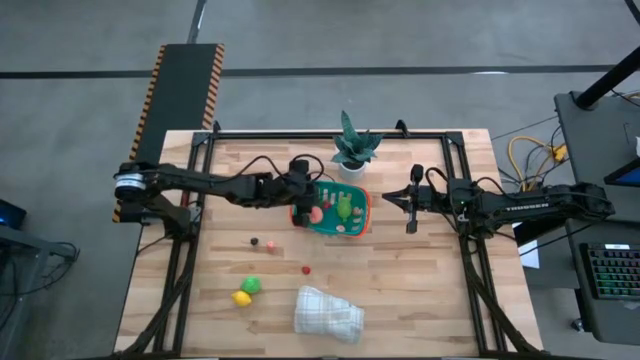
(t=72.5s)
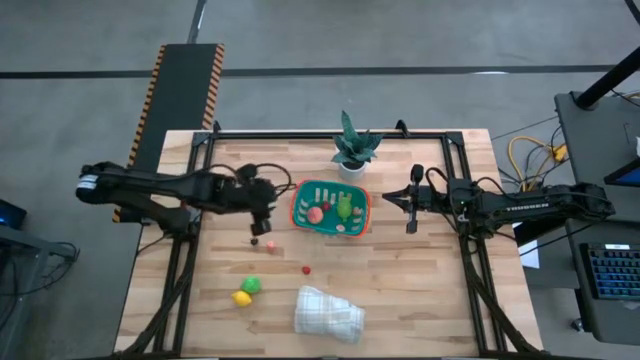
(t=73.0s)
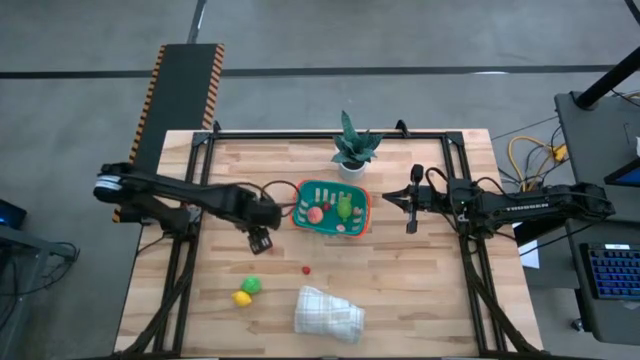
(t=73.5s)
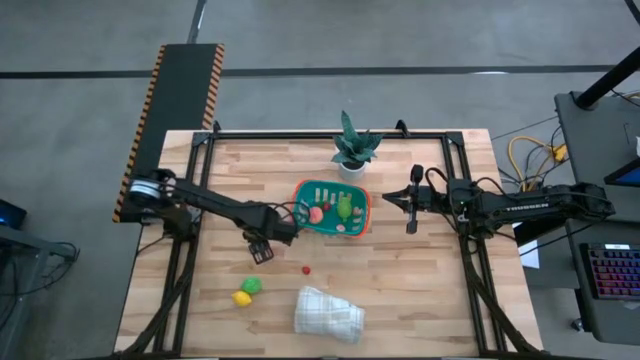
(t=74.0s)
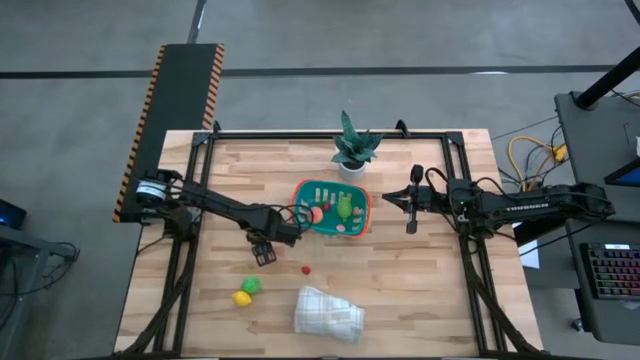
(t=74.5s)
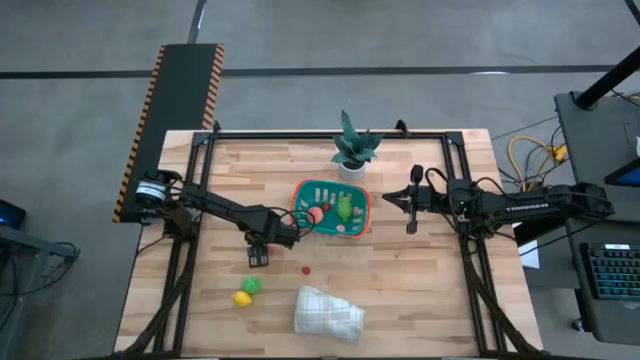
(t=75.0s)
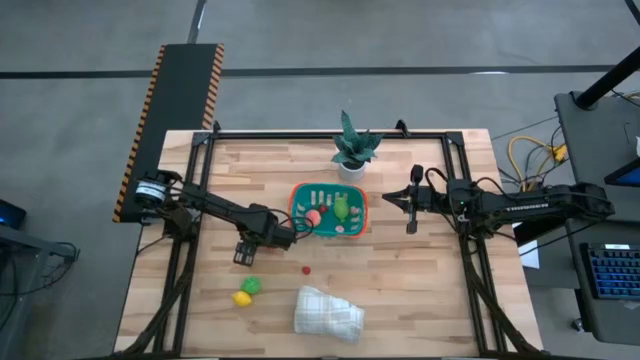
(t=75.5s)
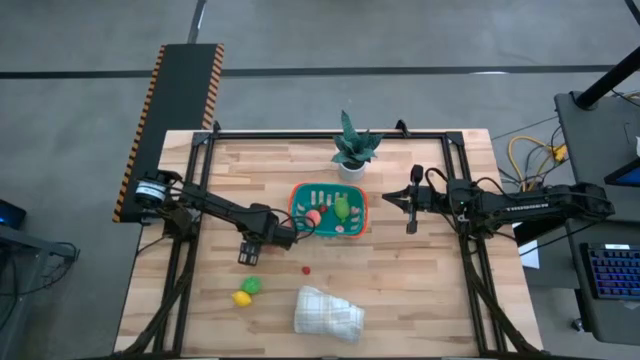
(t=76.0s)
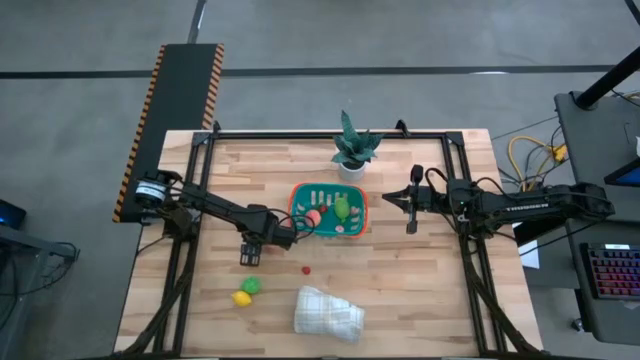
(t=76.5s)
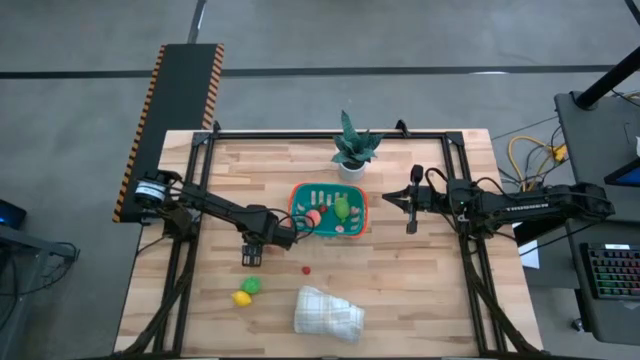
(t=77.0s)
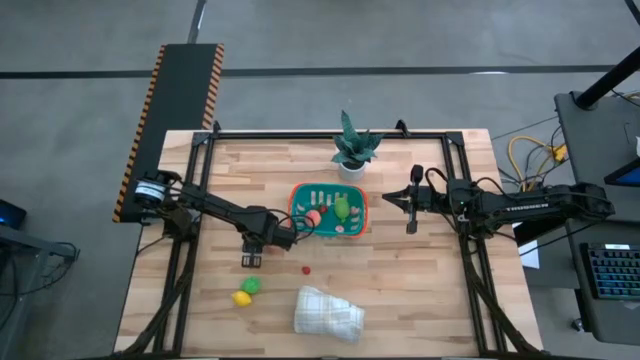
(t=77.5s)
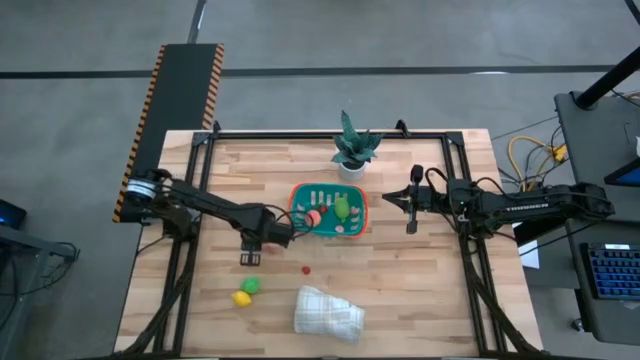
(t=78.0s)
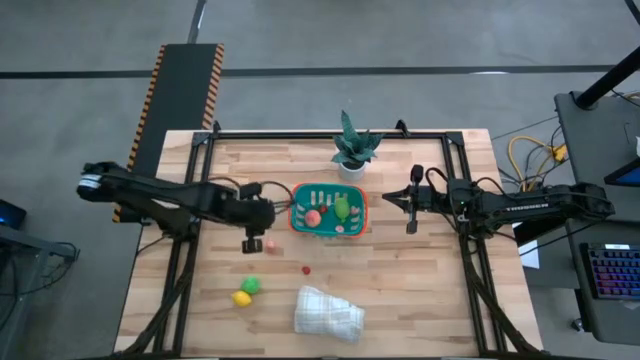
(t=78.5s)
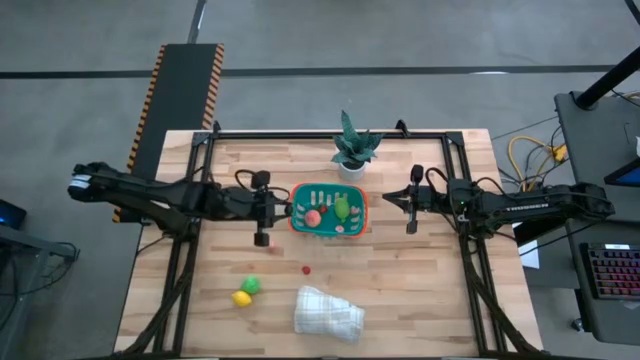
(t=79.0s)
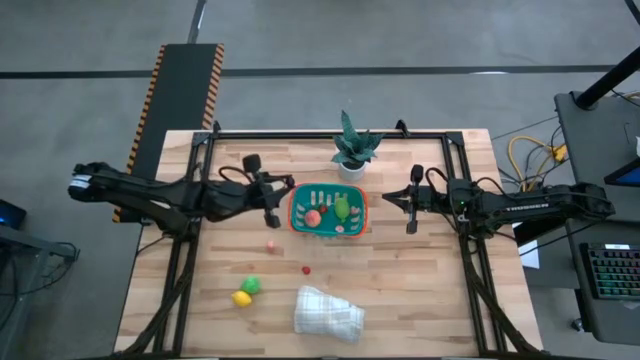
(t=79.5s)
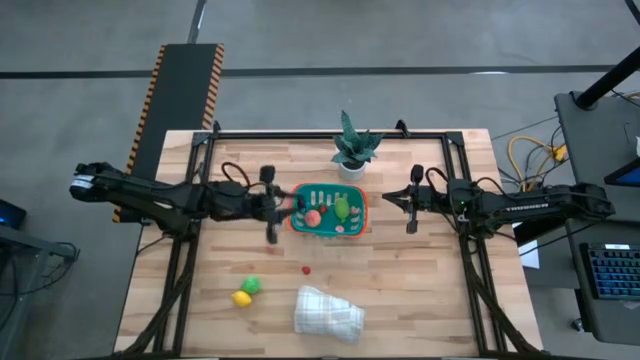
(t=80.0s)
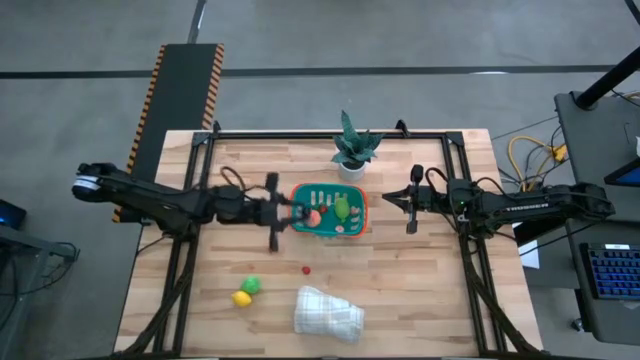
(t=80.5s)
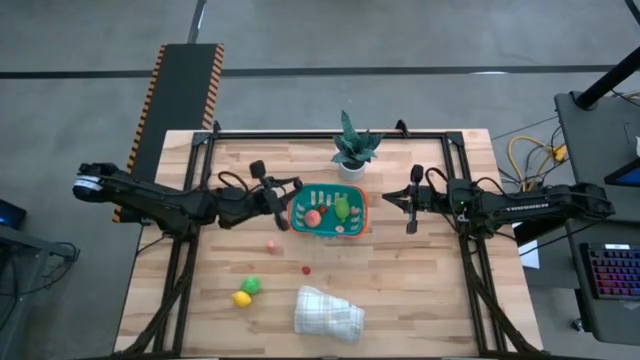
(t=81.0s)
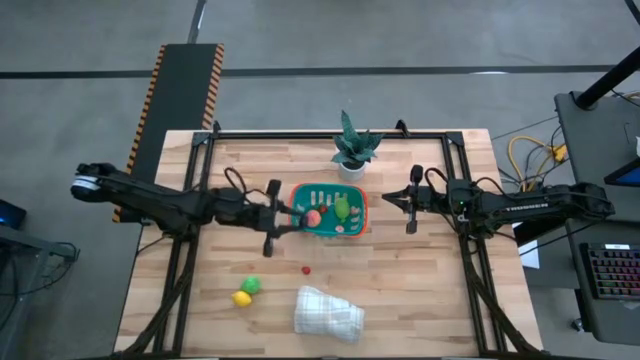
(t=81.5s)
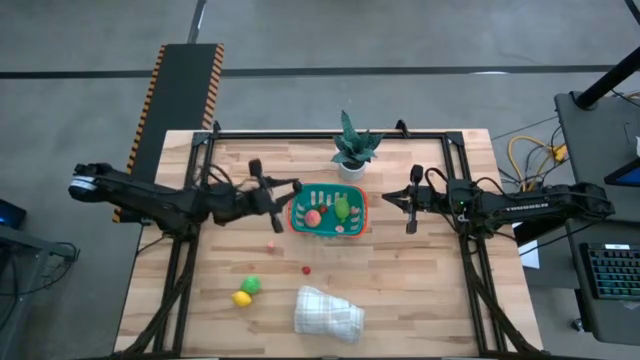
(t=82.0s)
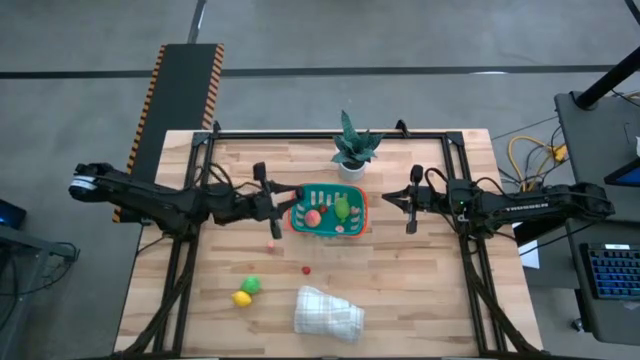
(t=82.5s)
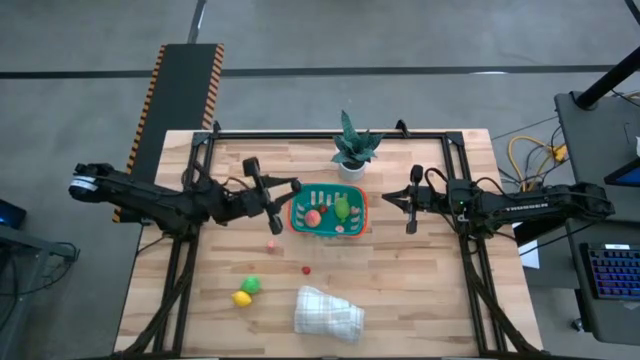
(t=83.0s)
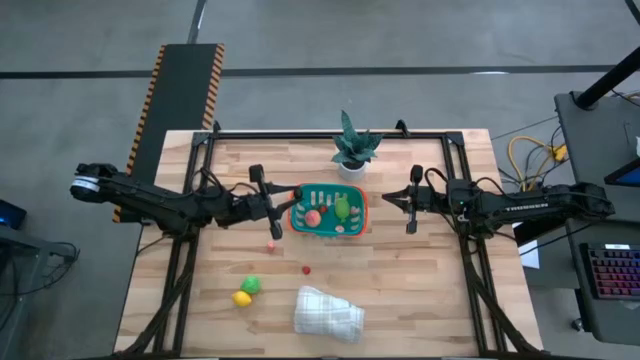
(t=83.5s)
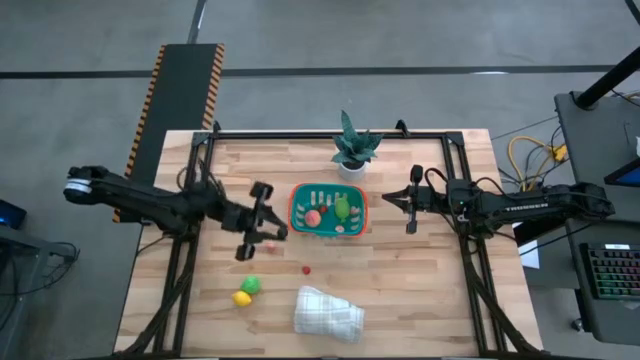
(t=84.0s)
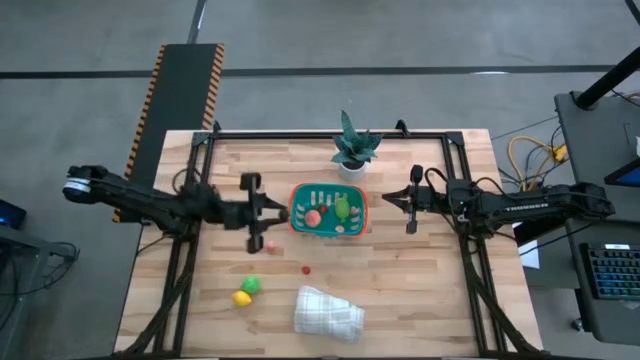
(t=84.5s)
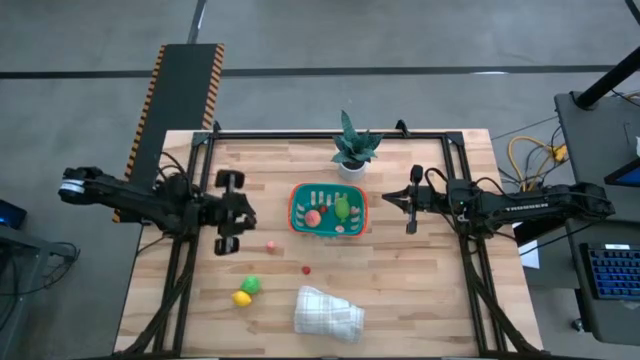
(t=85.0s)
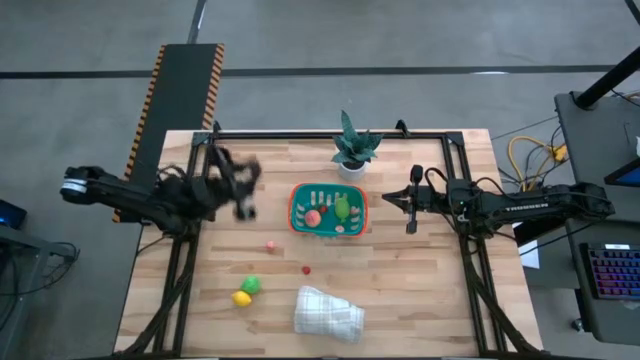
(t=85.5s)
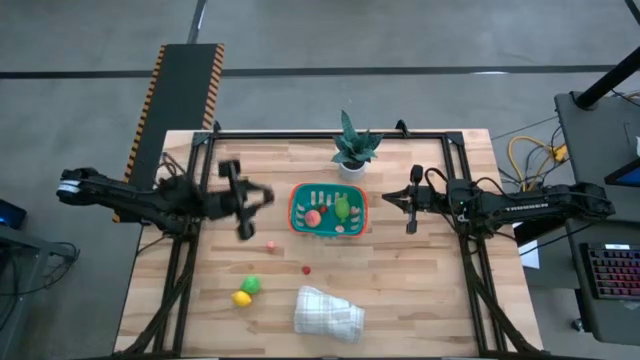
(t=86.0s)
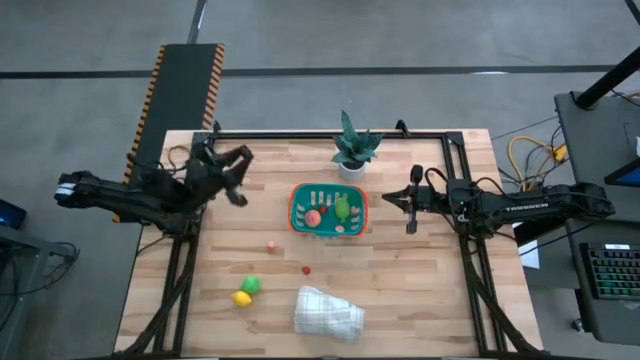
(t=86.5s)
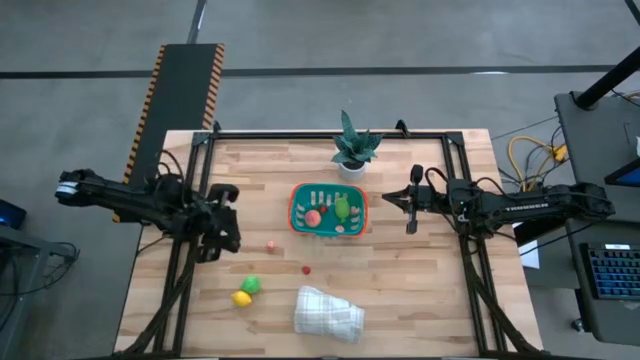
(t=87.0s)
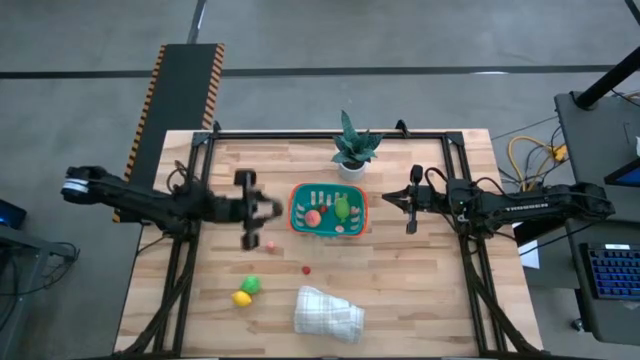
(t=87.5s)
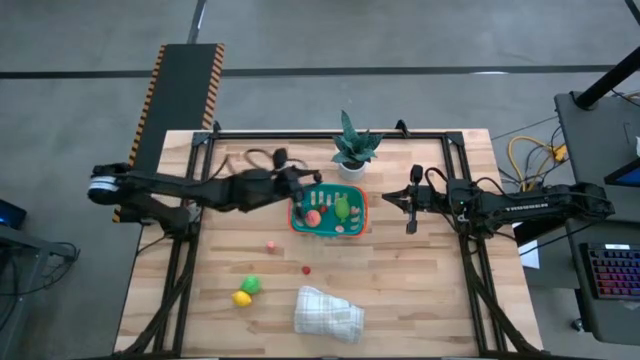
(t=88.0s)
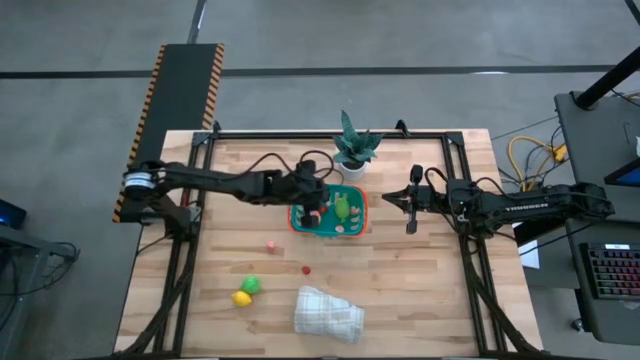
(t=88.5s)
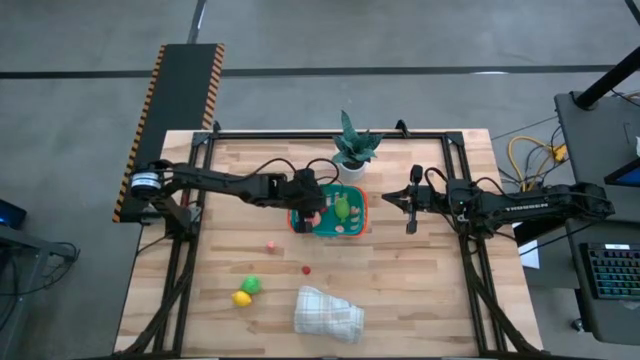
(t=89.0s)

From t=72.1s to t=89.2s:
Task: Build produce basket
Put the black cherry into the blue basket
